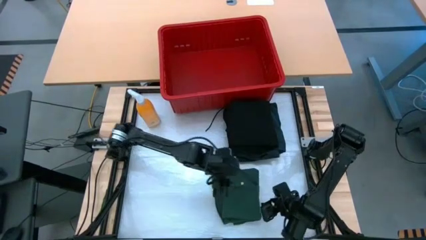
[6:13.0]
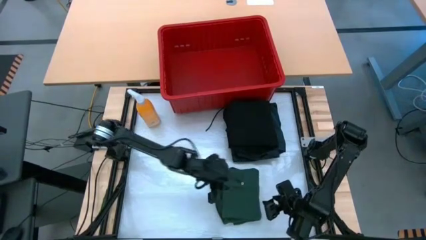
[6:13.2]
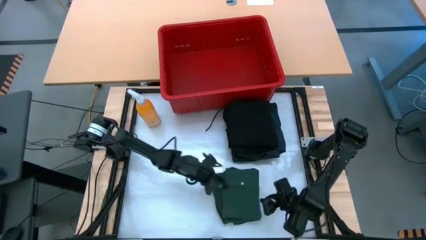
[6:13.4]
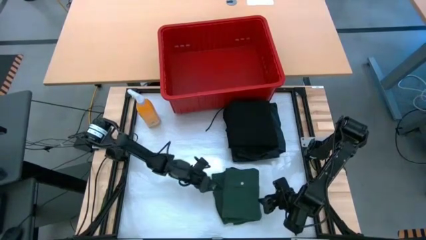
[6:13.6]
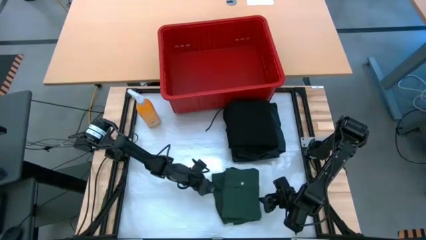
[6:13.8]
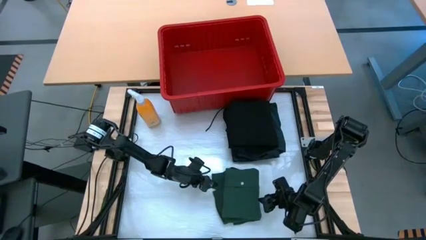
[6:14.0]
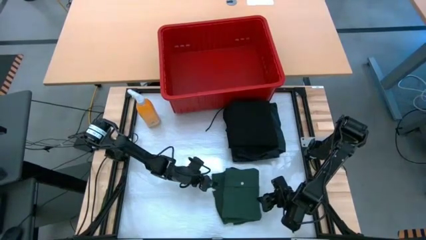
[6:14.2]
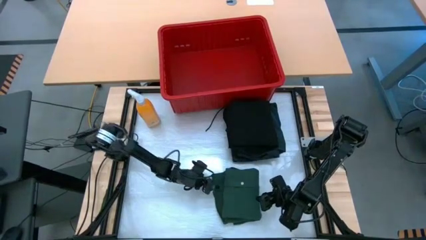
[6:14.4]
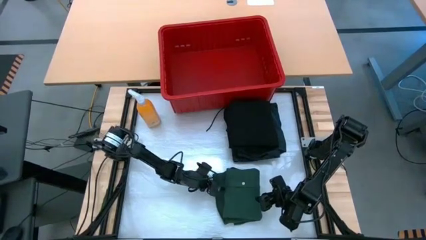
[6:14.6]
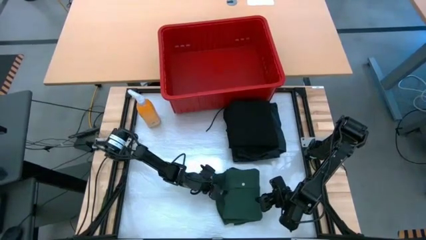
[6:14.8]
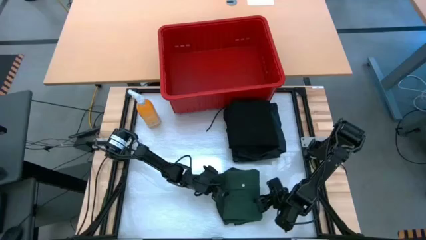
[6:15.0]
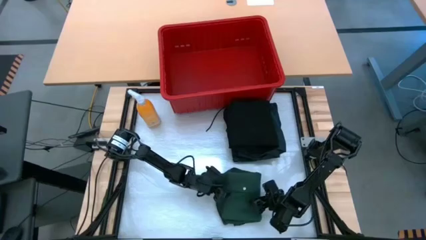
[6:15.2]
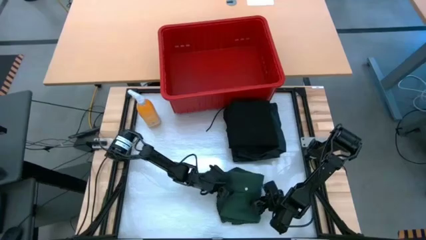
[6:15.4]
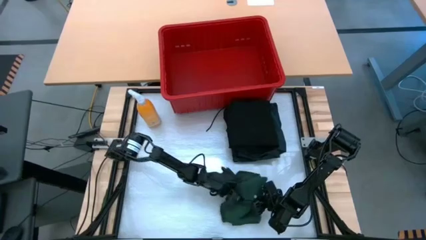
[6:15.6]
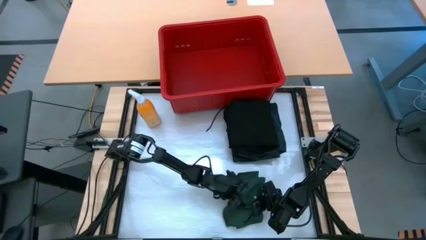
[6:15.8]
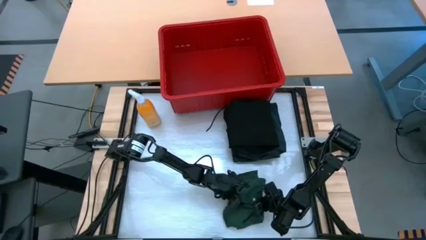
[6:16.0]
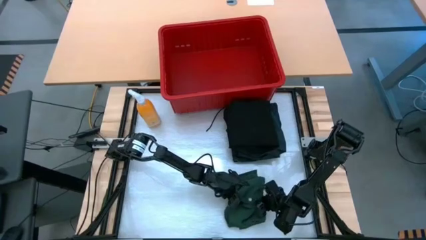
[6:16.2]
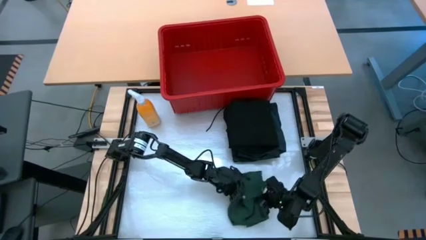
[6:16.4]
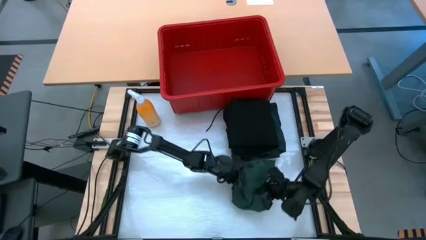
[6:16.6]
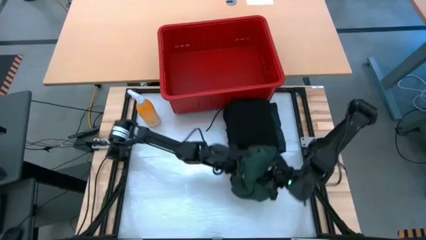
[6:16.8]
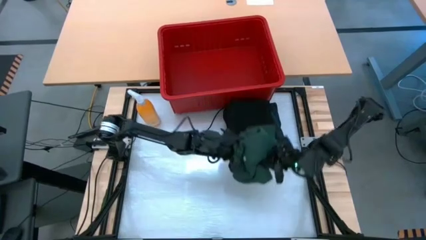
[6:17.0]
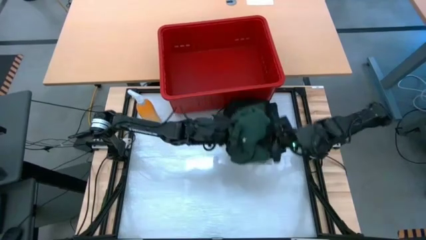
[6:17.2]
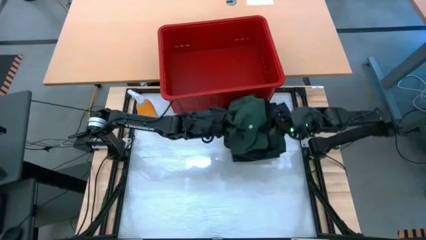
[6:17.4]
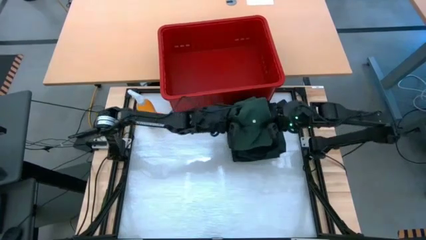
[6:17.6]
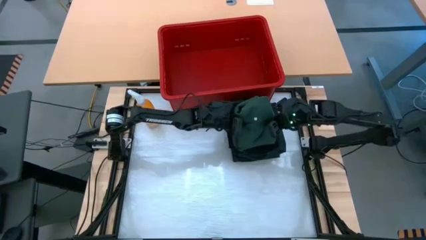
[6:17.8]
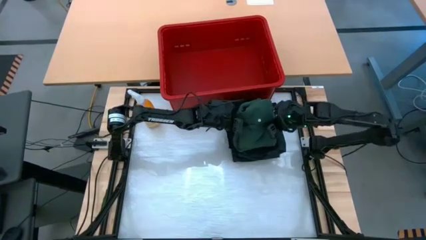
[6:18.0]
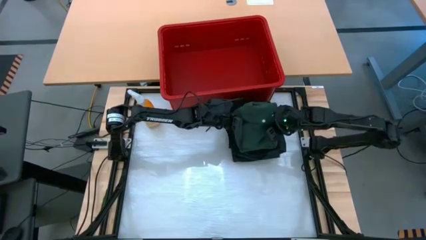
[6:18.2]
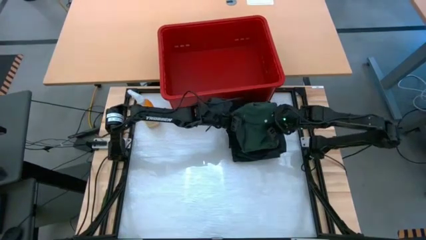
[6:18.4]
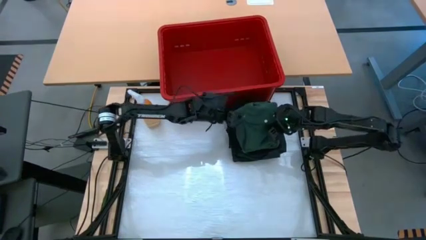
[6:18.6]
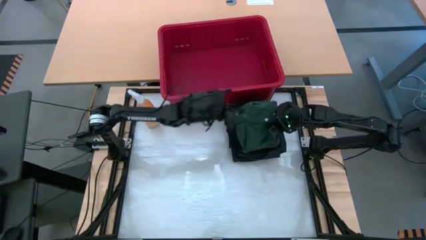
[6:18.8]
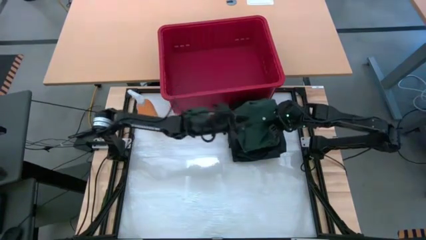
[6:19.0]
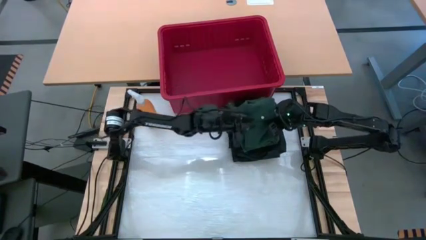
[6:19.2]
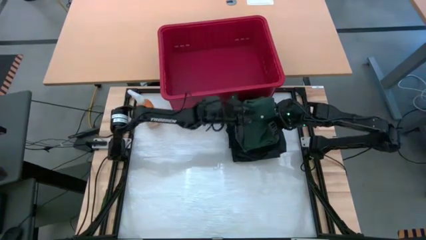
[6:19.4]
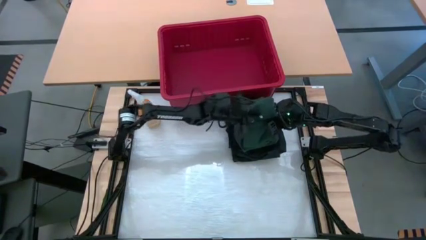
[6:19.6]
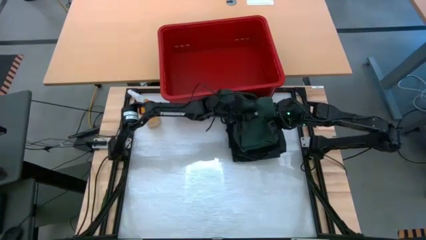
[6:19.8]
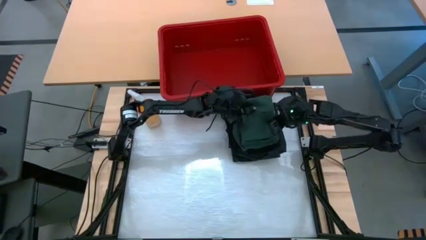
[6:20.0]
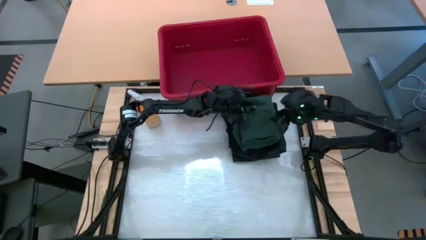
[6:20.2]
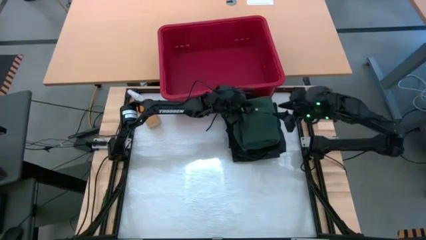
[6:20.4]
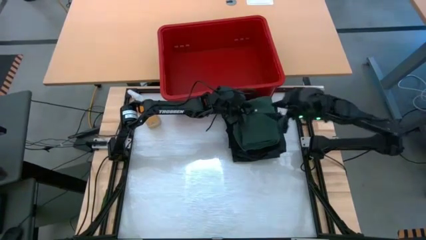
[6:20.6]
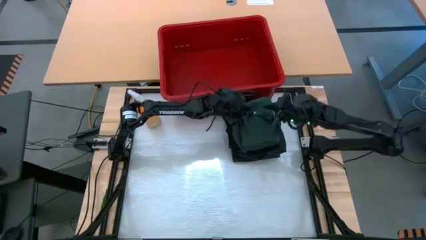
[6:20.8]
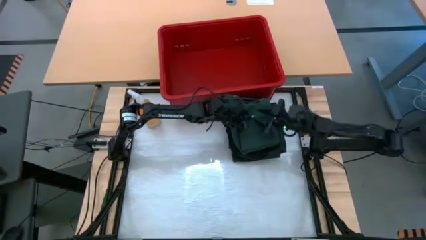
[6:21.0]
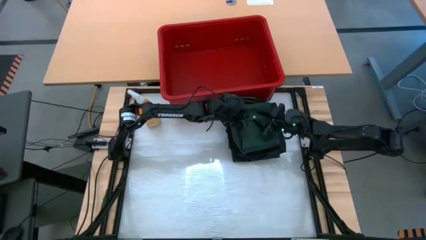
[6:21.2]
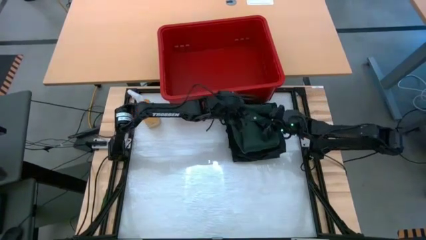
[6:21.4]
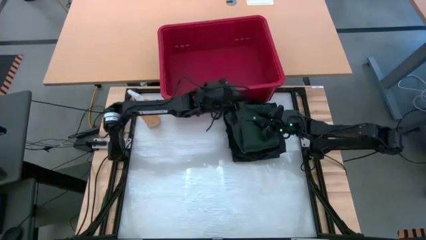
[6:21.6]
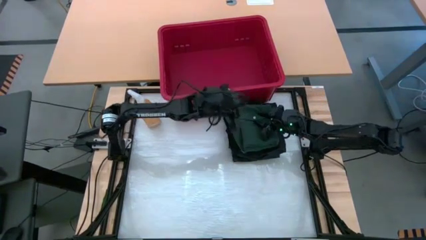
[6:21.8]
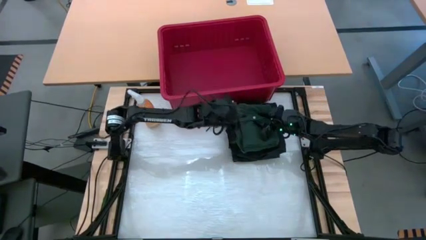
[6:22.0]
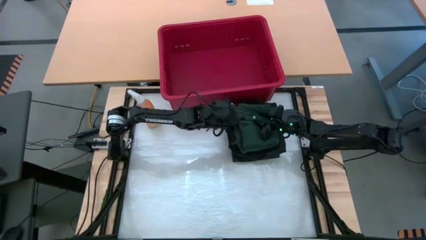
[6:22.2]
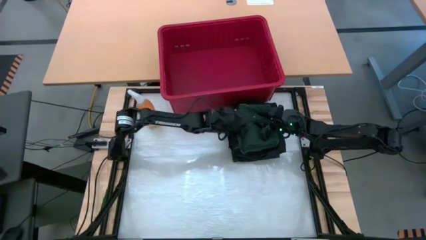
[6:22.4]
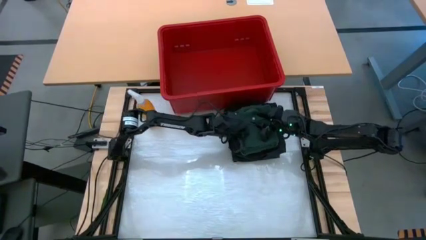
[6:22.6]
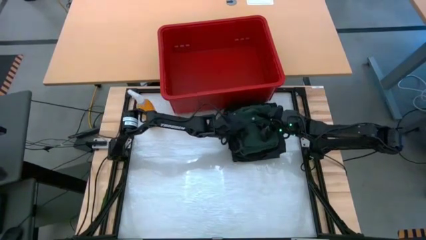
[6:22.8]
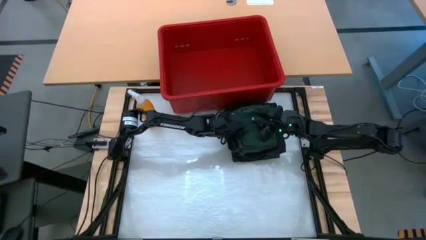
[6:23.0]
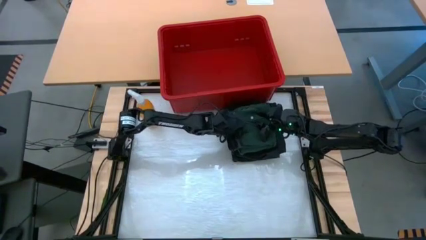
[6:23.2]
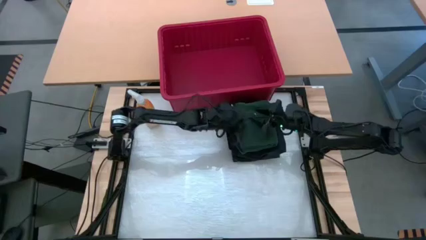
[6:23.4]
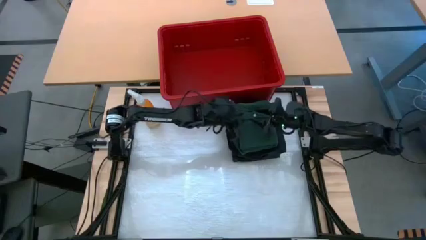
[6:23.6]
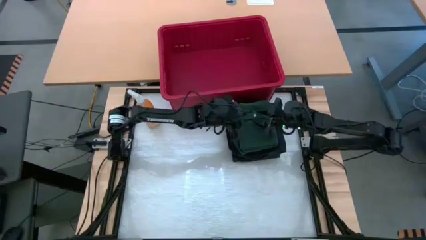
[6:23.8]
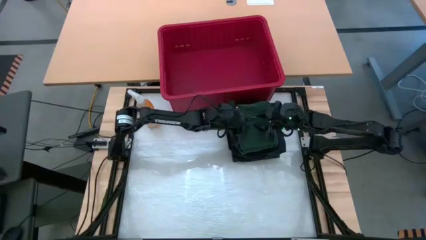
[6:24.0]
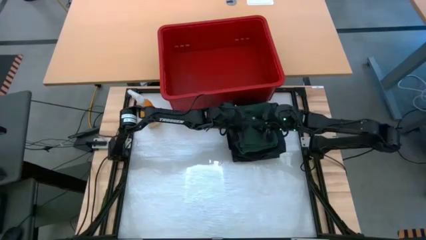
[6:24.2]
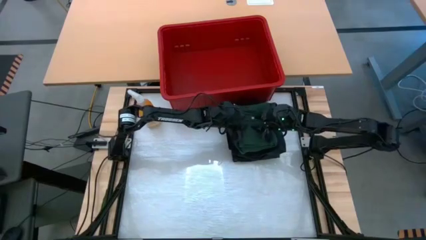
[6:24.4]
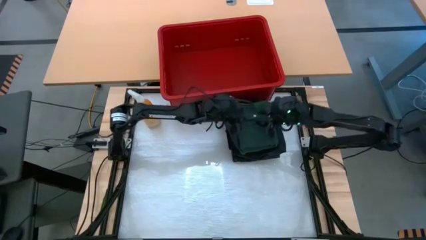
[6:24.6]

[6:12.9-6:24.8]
Task: Fold Laundry from Bin
Stack the green polo shirt on top of the black shirt
